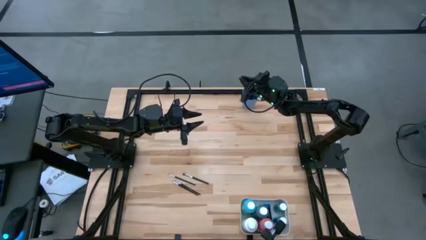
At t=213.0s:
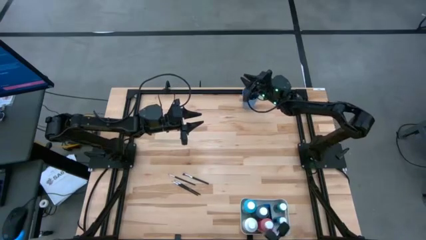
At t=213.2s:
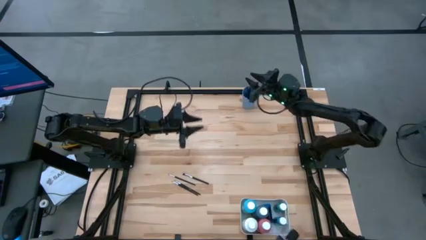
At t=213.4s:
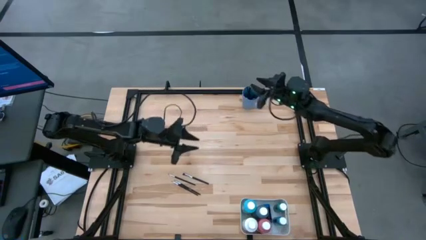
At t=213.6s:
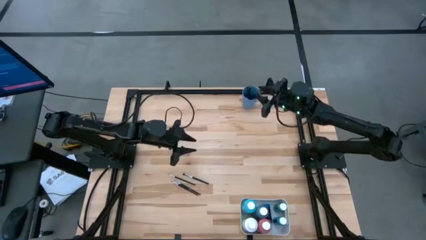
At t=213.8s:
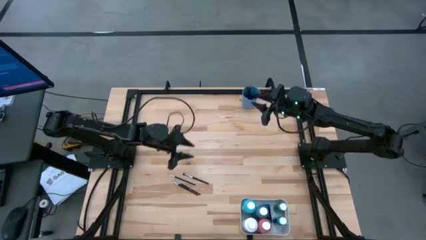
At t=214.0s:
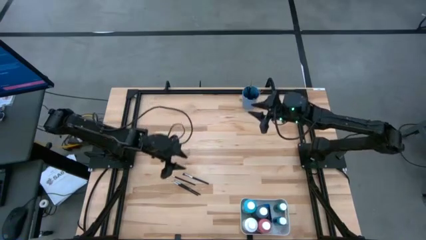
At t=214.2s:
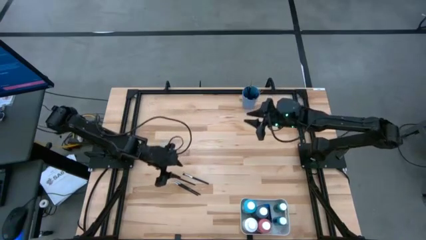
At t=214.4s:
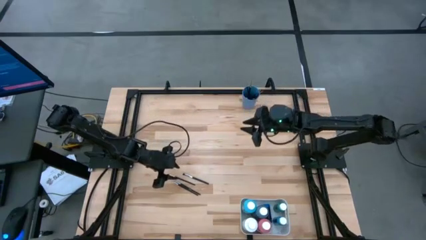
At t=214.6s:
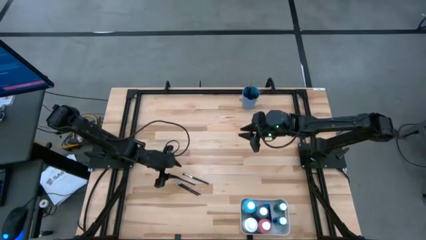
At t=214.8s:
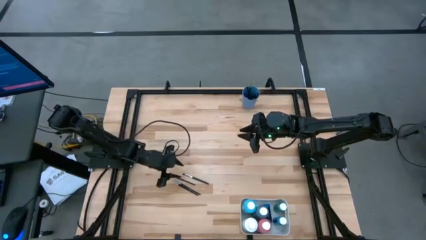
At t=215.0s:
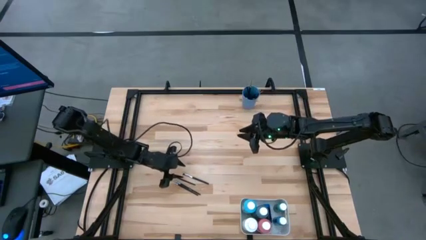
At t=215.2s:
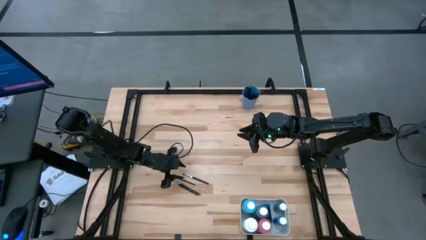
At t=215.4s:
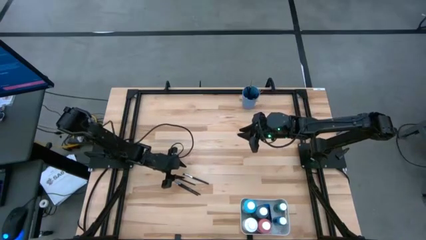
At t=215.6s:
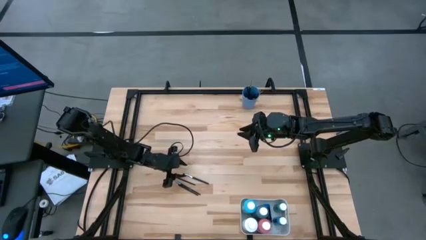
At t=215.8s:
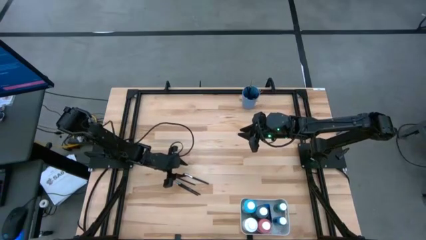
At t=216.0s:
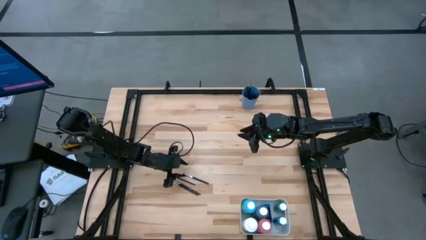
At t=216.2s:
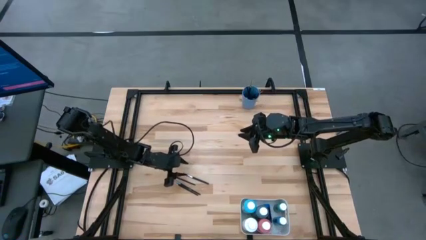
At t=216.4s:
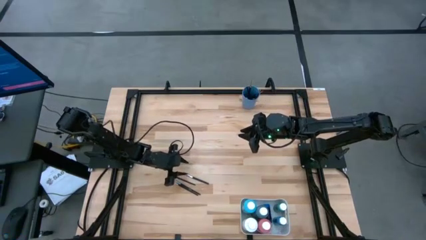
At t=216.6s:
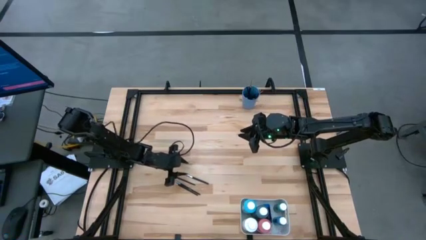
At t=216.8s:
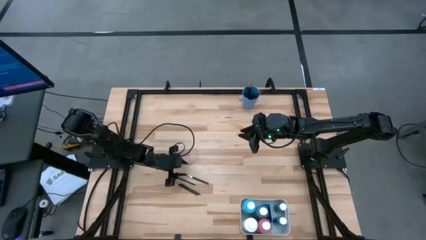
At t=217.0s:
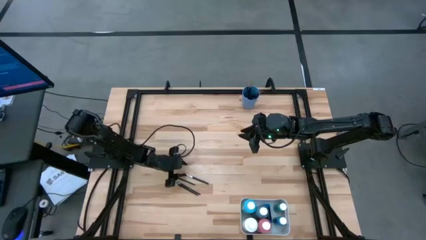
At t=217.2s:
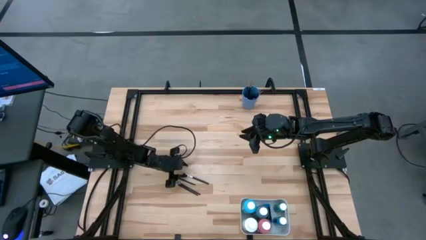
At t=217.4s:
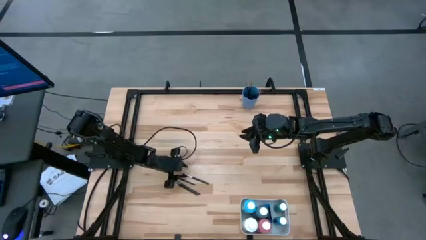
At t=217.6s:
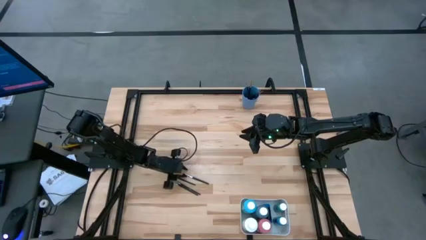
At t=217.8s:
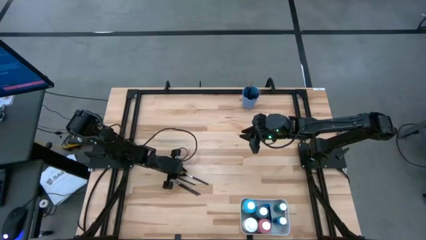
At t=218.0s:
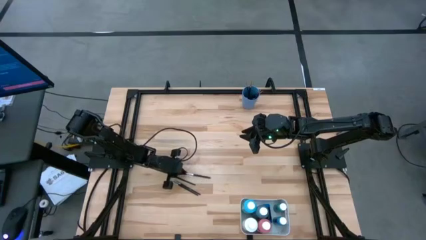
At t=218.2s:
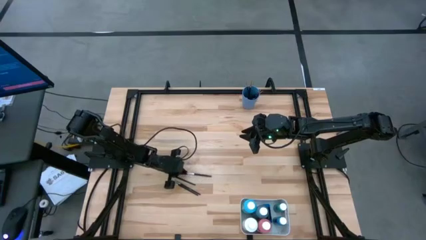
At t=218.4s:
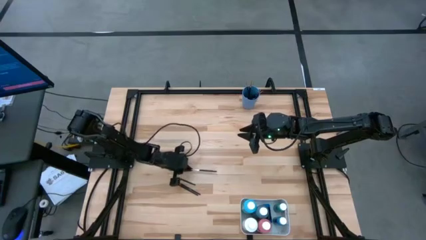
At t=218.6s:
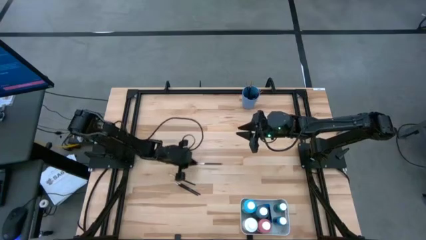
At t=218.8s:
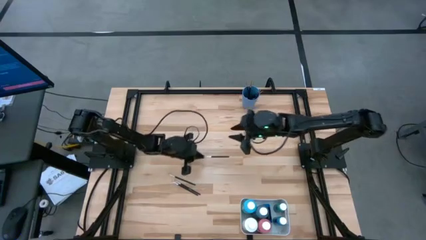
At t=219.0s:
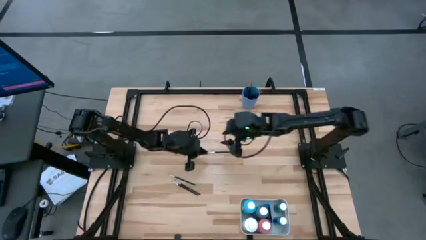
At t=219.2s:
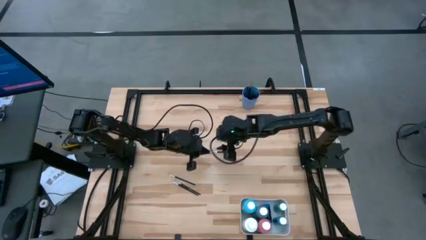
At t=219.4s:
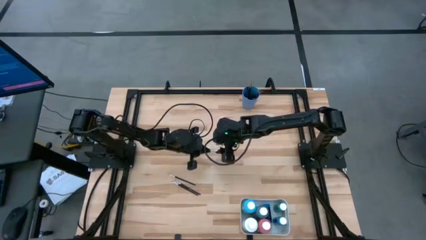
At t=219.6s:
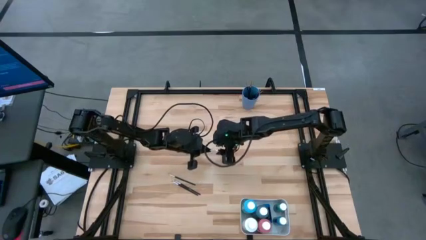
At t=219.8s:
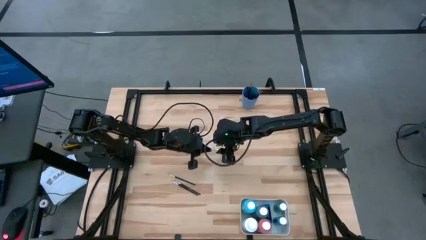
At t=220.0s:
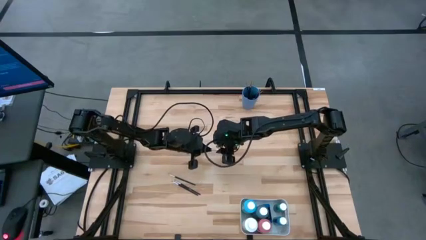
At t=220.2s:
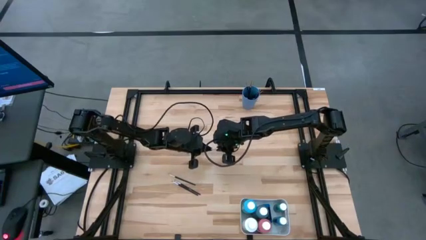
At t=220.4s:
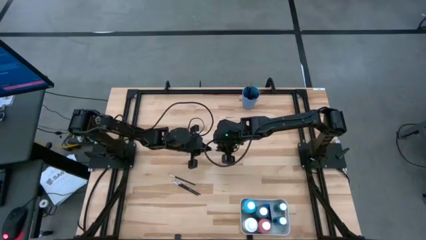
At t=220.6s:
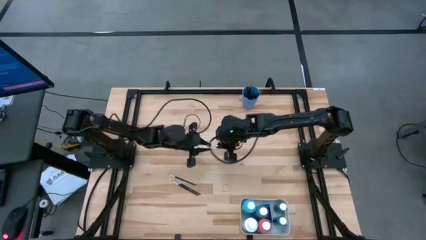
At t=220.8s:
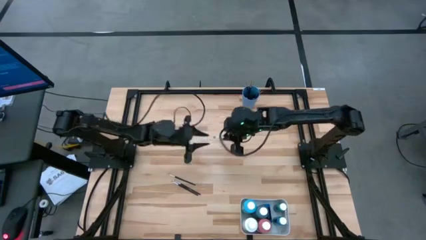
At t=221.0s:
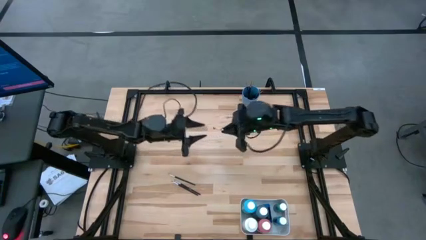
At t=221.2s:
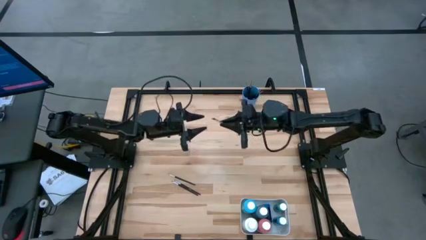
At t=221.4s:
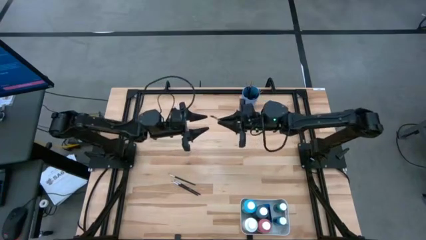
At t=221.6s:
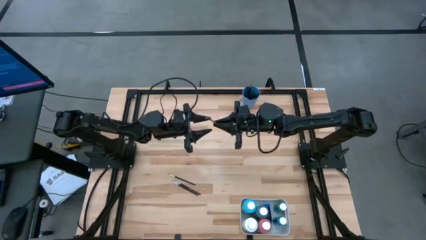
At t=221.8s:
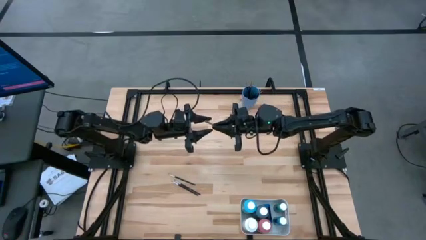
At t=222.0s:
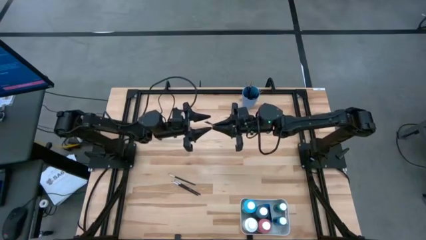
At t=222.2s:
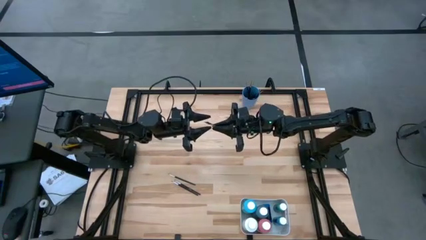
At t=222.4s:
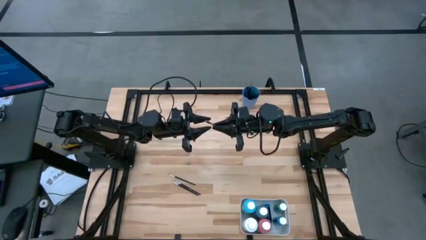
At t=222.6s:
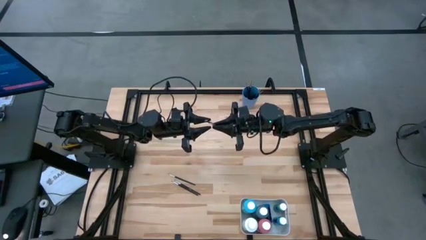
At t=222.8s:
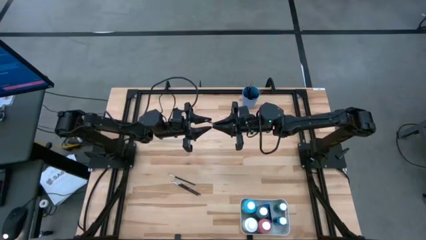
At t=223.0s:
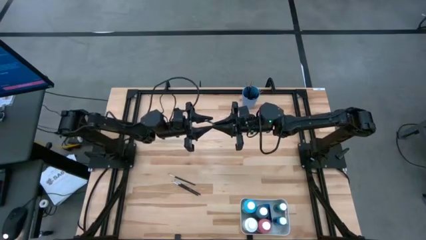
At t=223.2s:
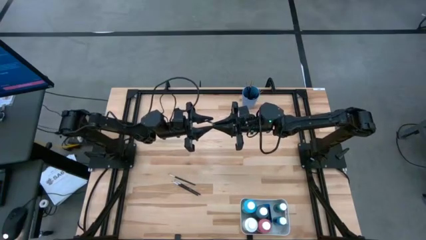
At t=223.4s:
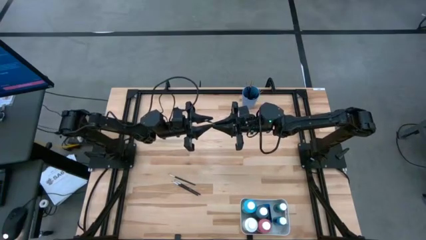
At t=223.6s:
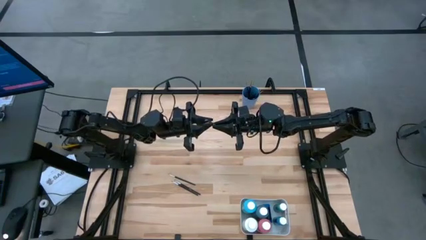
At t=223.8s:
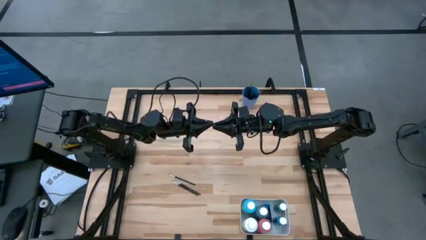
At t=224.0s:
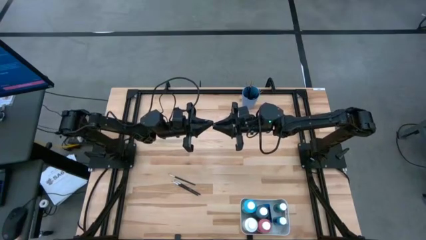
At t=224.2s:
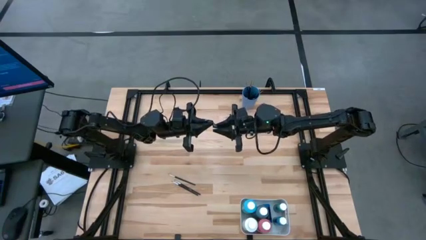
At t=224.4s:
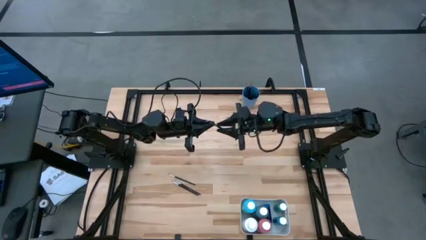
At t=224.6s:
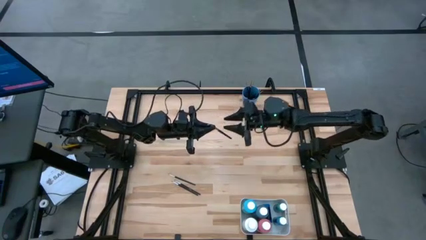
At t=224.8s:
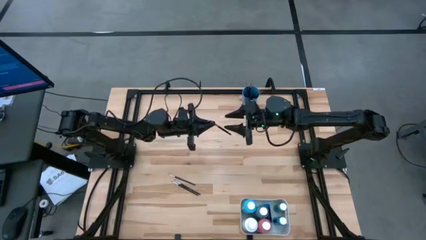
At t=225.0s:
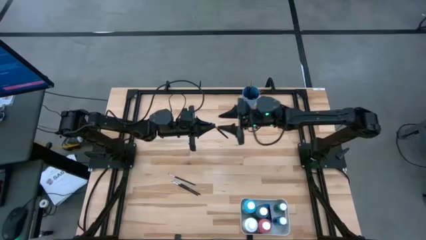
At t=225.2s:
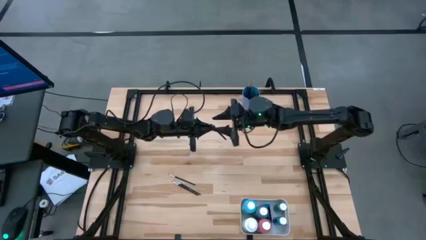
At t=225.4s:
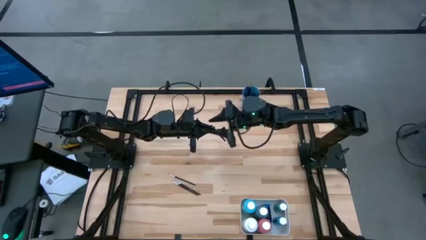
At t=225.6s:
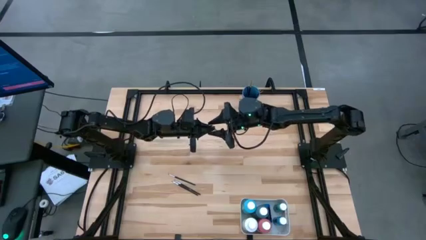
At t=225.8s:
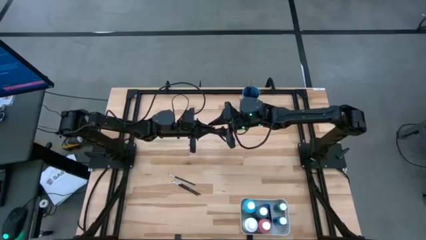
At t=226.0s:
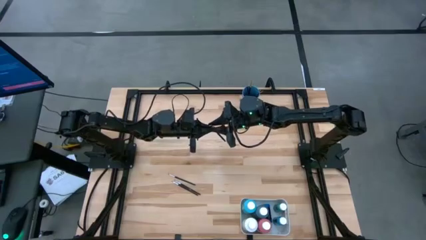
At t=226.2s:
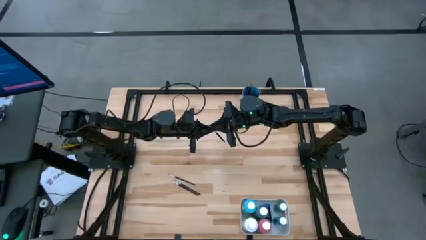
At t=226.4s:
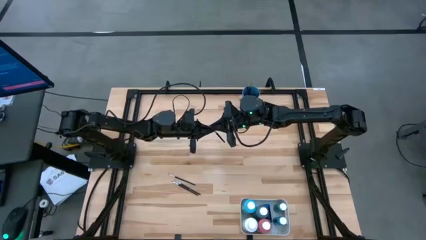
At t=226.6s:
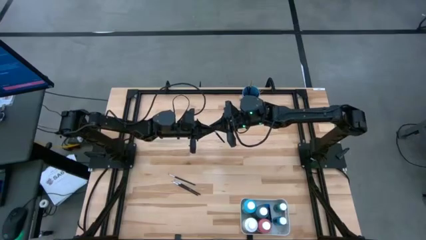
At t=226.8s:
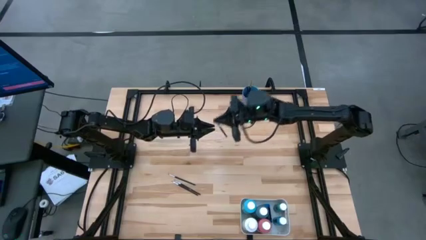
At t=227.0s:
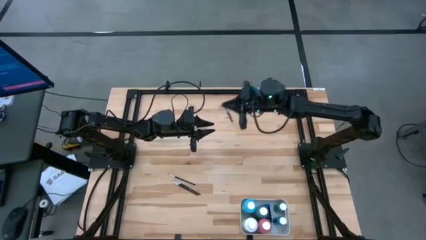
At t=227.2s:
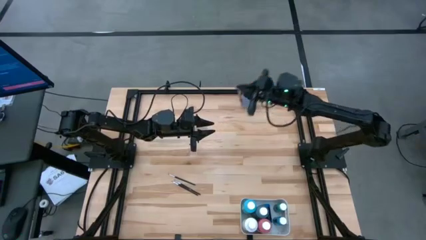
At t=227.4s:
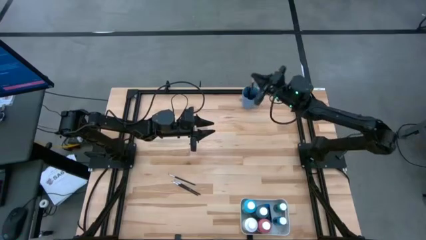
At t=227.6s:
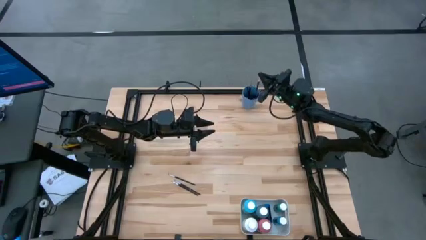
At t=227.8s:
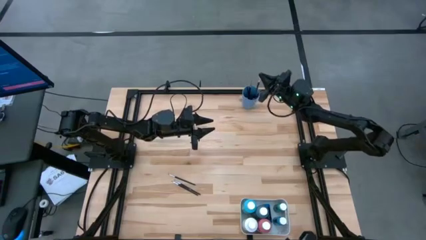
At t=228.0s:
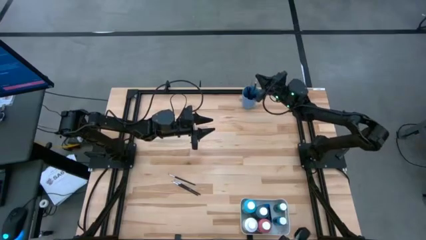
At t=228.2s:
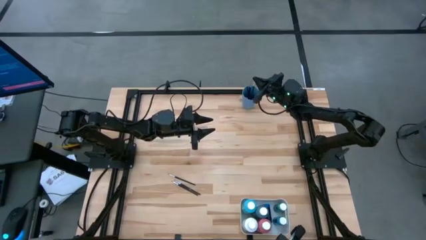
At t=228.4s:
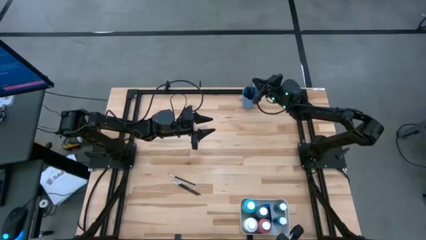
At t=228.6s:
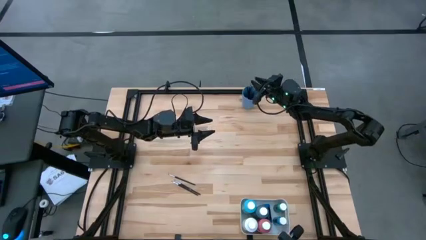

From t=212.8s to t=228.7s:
Task: Pick & Place Paint Supplies
Put the silver paintbrush into the blue cup
